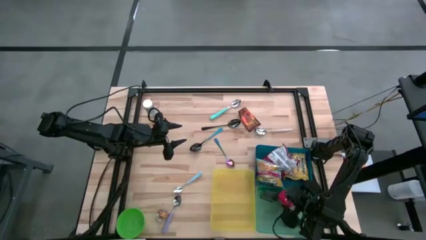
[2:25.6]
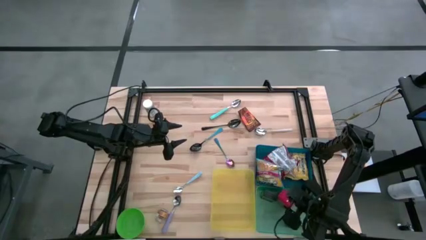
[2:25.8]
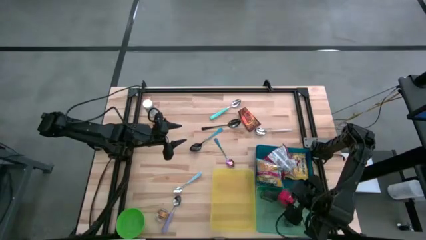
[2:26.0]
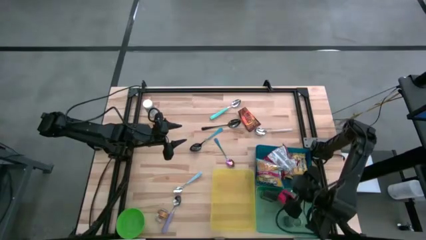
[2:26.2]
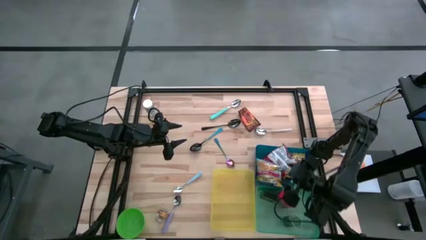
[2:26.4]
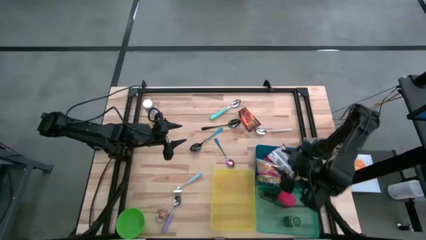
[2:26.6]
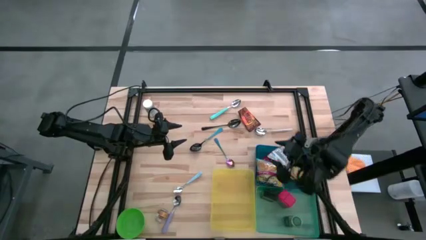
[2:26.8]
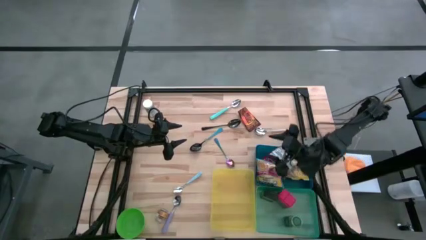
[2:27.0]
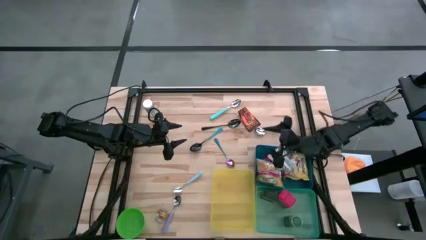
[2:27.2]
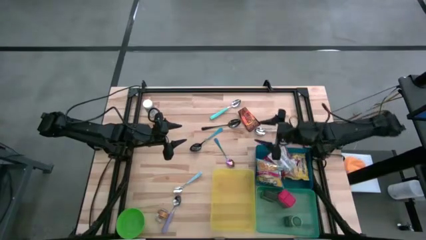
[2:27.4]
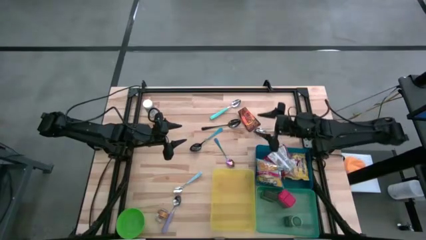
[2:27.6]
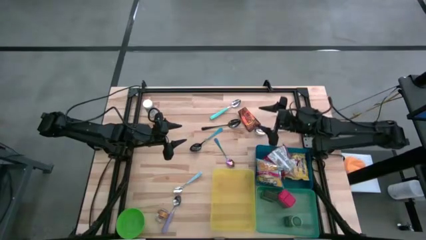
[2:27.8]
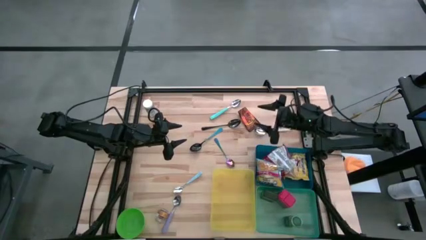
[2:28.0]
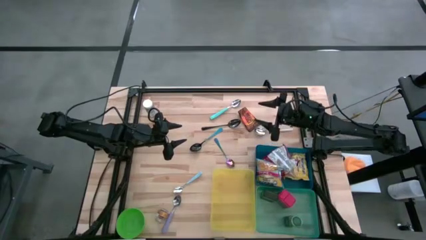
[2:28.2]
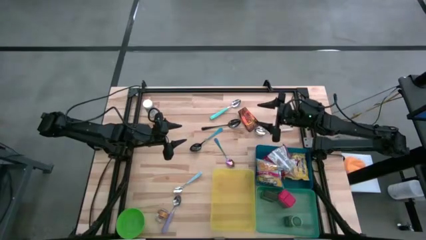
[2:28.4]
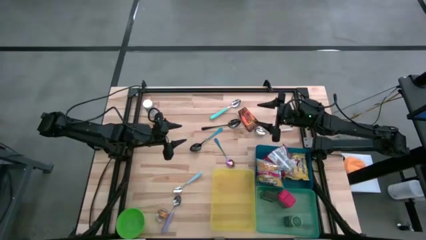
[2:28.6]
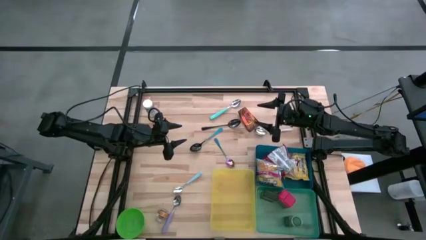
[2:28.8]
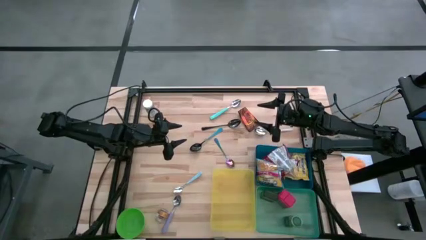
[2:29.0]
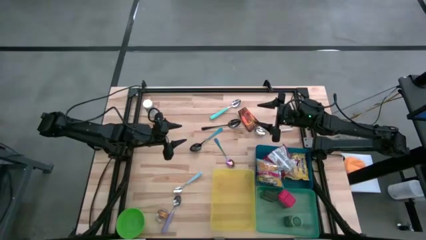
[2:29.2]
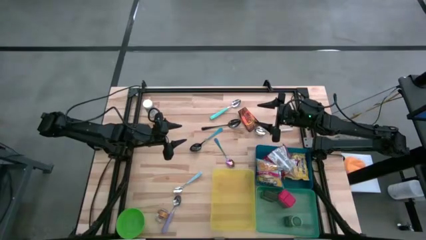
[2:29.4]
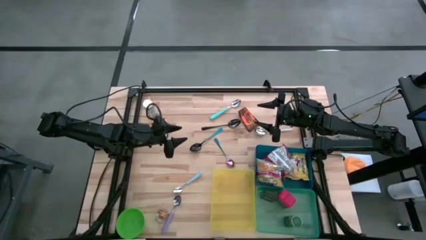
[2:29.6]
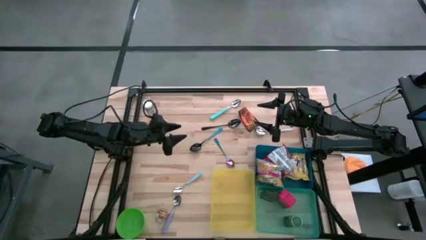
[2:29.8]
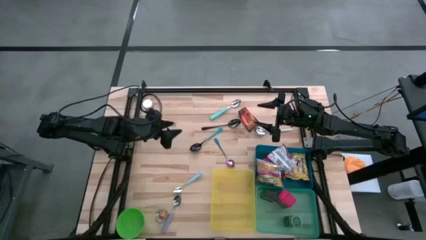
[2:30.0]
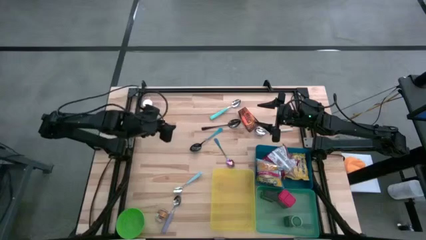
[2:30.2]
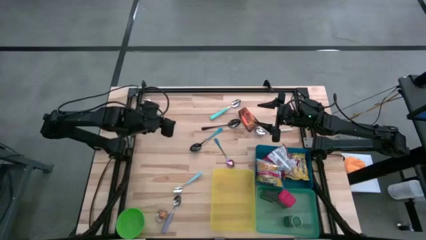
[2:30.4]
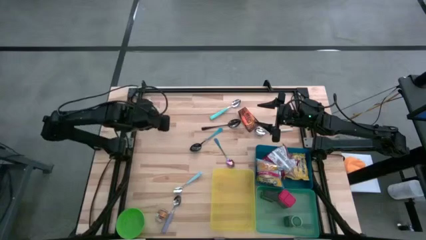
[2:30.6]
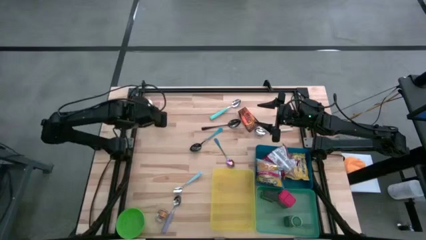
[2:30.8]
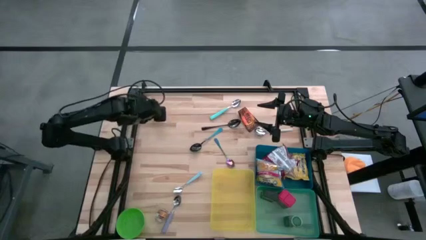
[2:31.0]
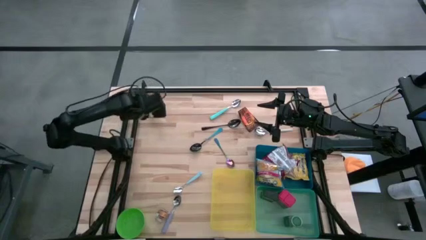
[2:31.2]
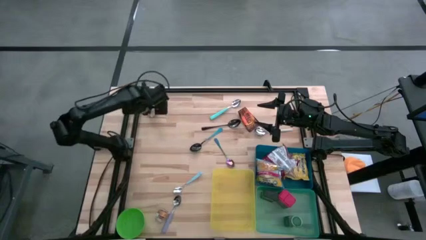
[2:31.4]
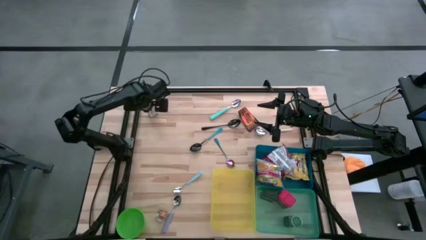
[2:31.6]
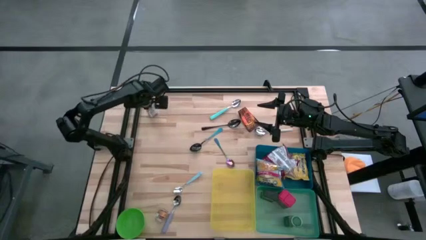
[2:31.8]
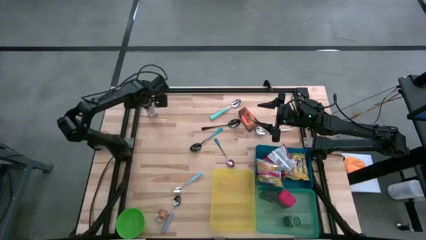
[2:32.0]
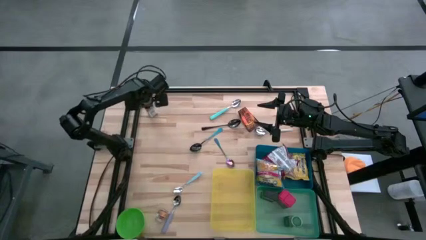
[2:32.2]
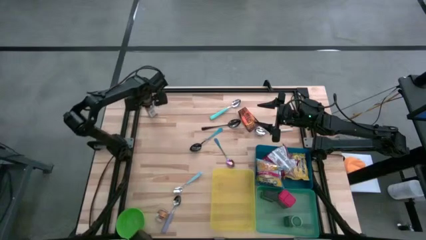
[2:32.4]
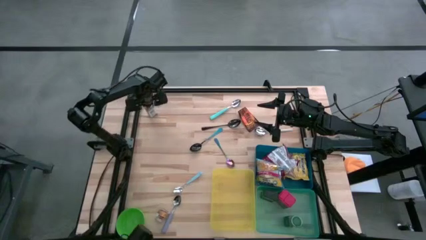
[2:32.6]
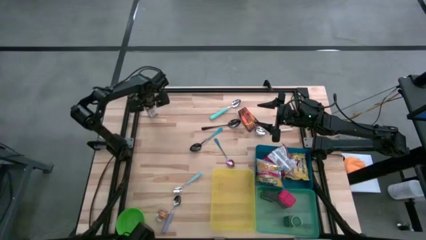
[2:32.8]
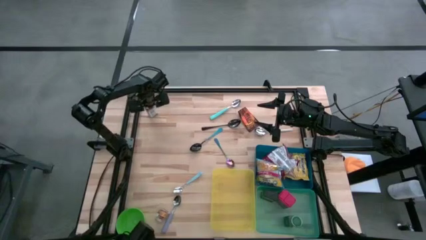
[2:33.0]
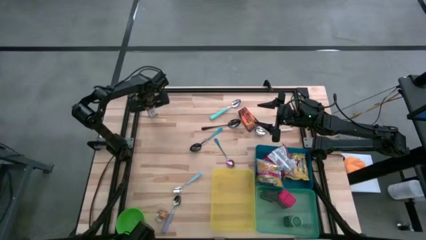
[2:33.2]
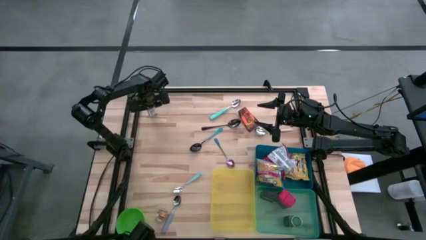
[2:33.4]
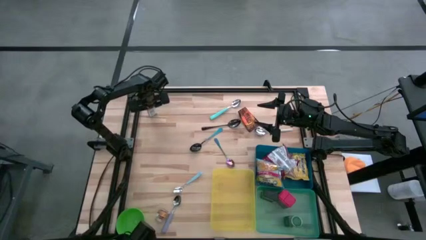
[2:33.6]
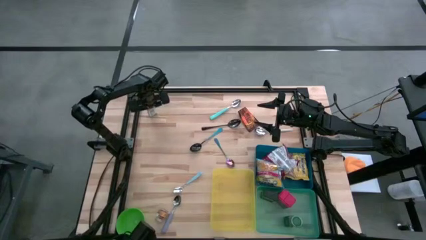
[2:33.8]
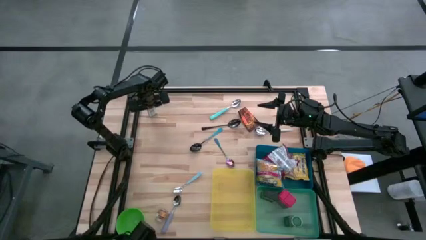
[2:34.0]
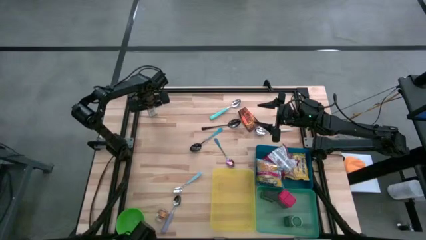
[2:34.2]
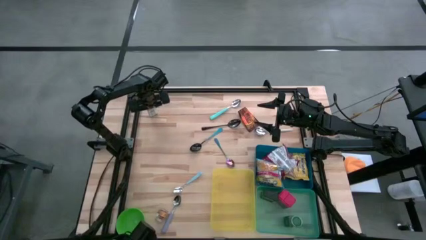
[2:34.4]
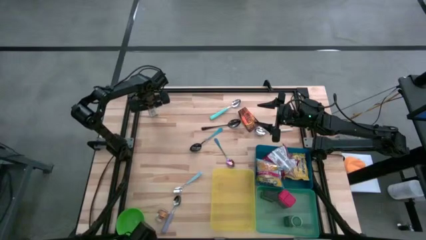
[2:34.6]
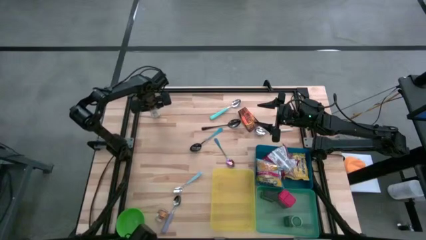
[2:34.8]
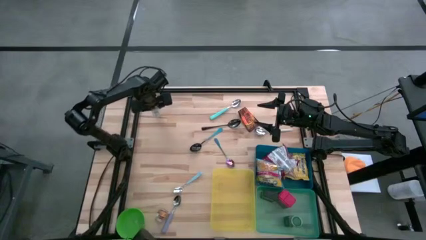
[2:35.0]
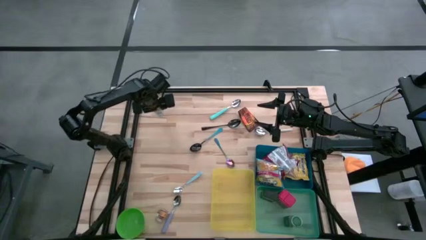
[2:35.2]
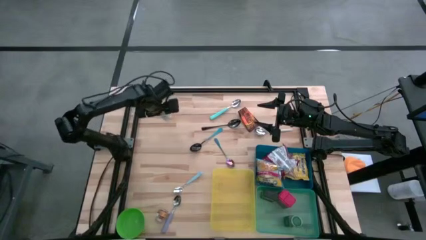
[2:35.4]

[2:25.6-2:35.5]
Put the white seasoning bottle into the green bin
